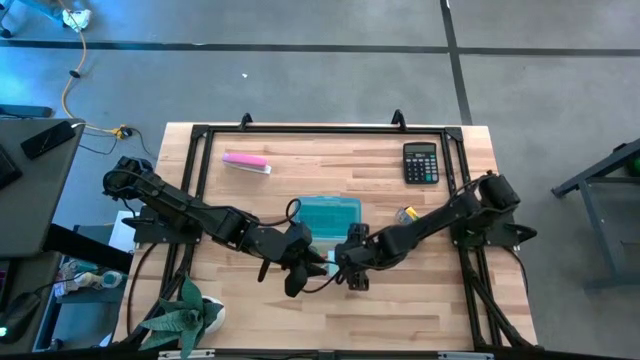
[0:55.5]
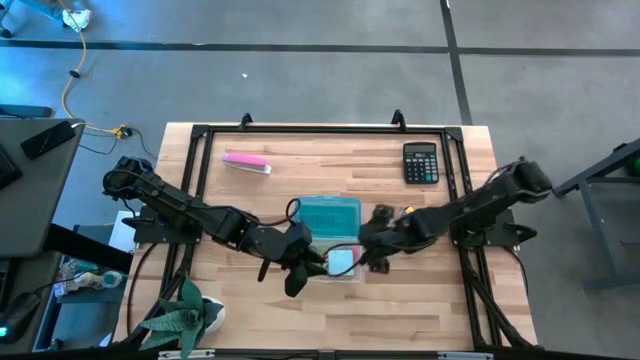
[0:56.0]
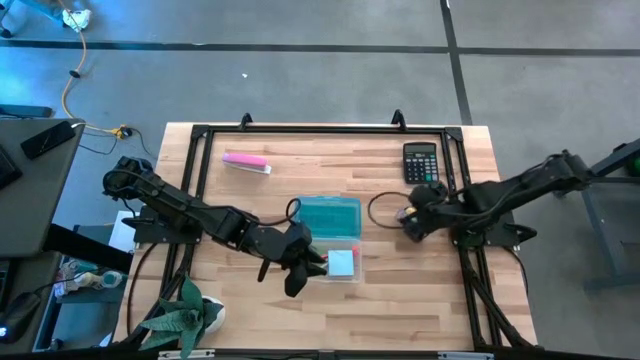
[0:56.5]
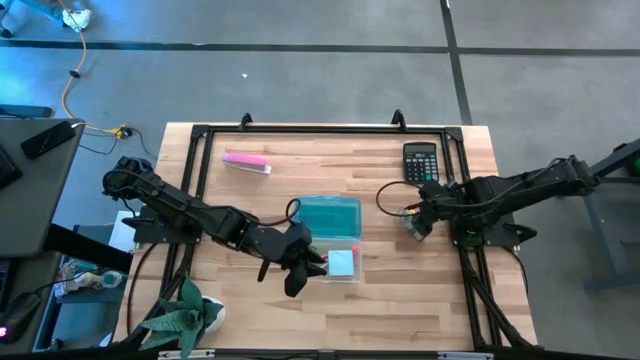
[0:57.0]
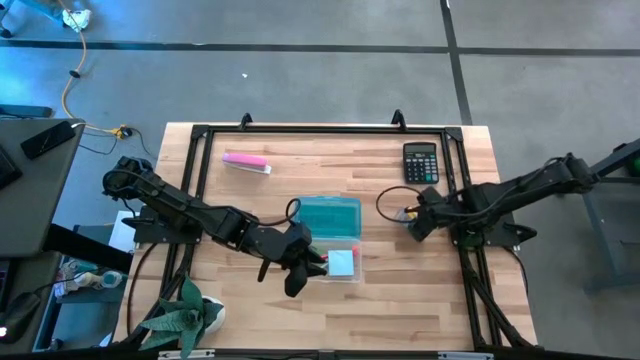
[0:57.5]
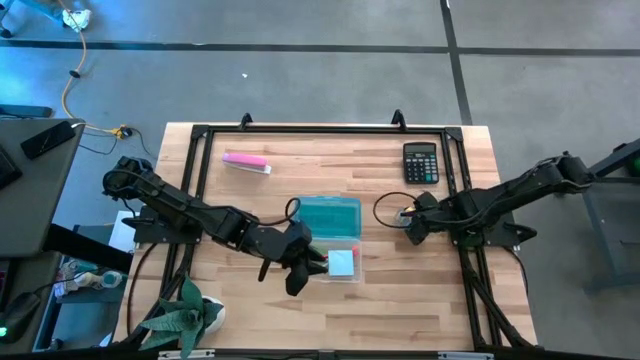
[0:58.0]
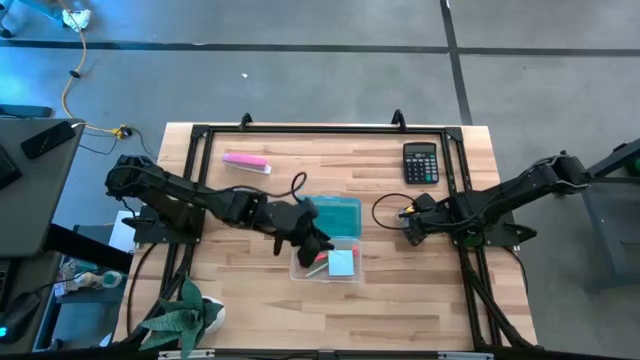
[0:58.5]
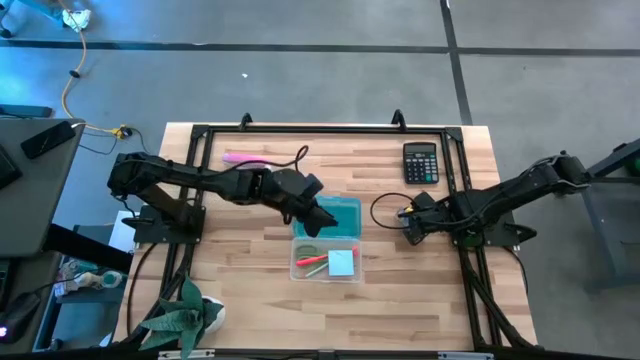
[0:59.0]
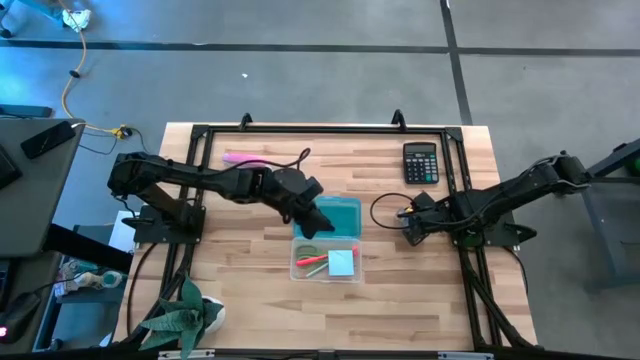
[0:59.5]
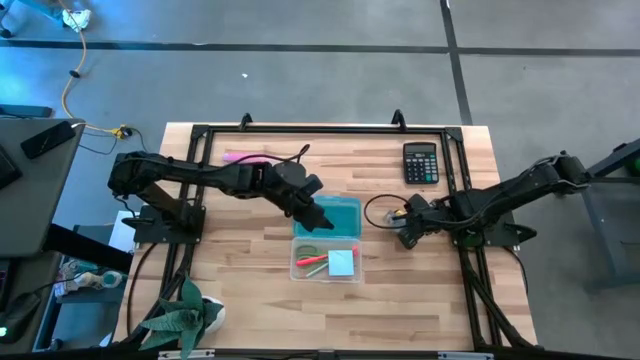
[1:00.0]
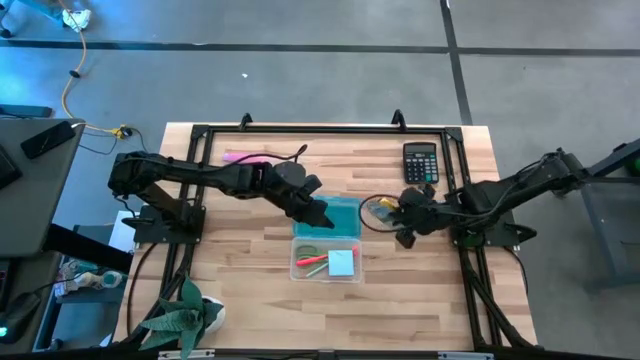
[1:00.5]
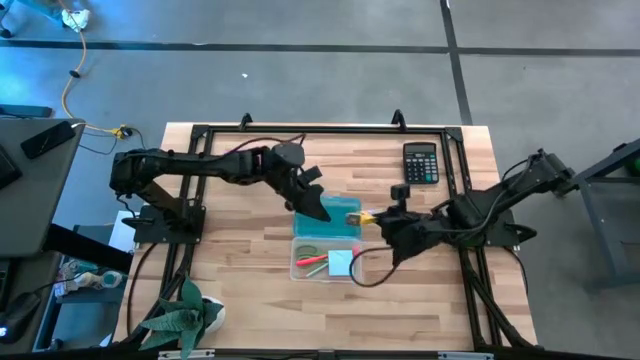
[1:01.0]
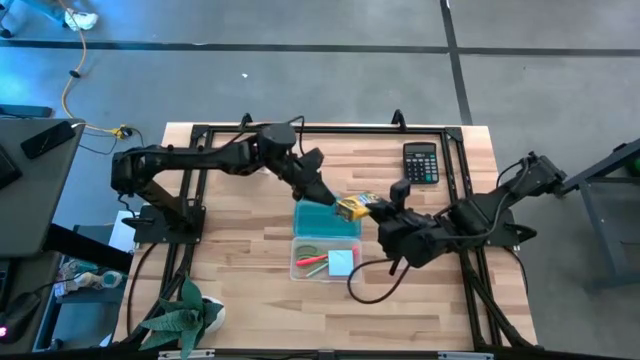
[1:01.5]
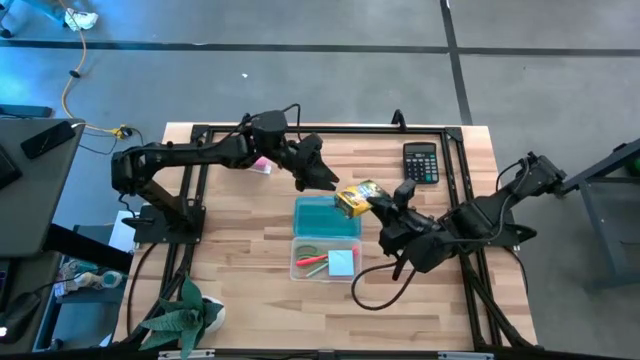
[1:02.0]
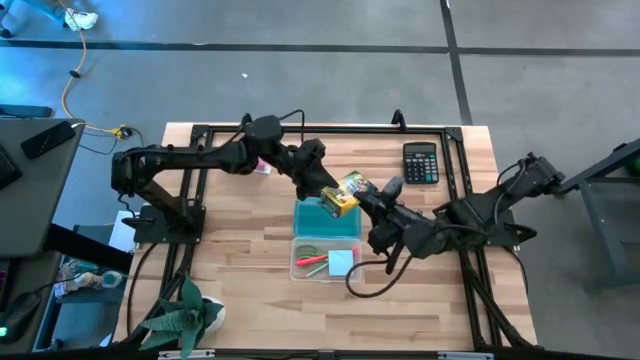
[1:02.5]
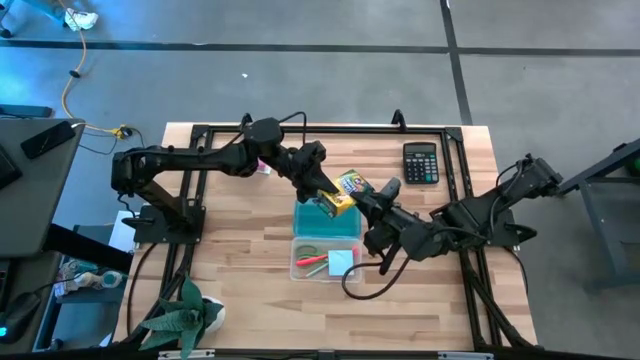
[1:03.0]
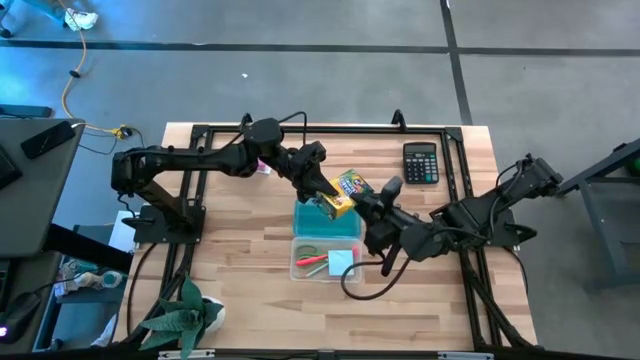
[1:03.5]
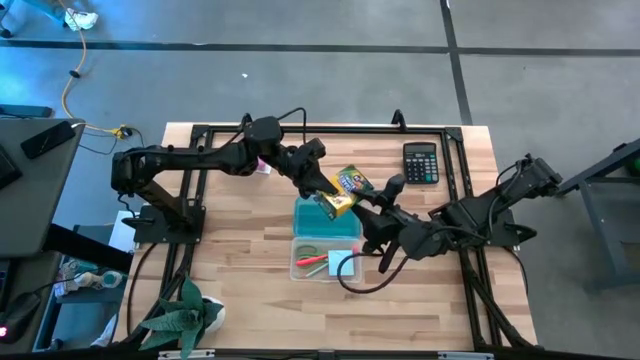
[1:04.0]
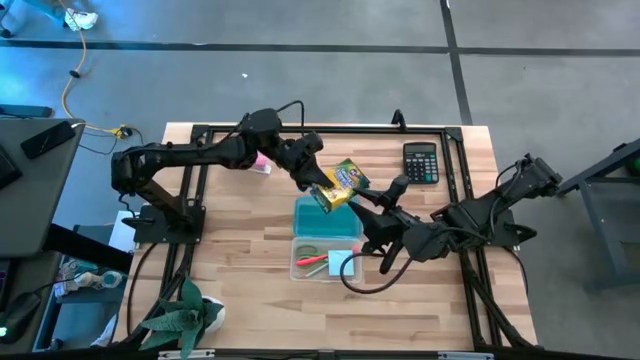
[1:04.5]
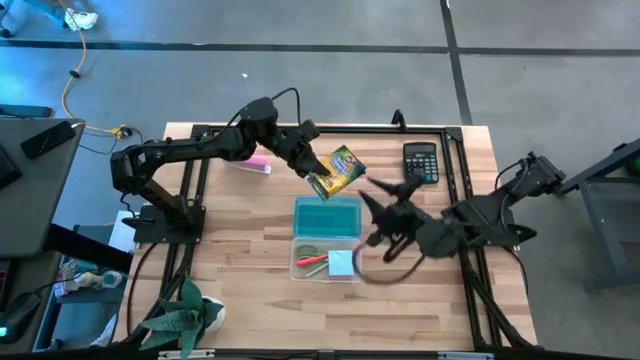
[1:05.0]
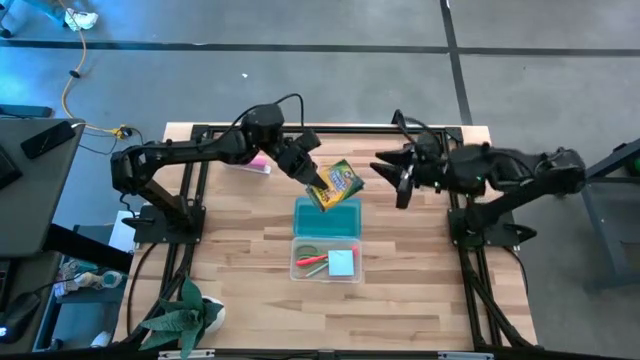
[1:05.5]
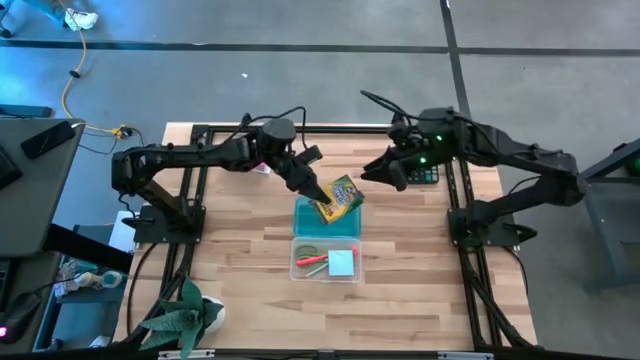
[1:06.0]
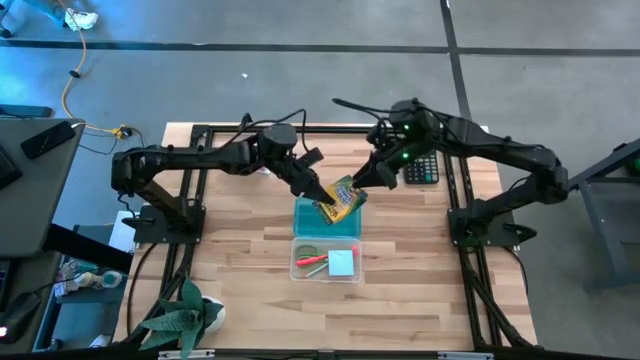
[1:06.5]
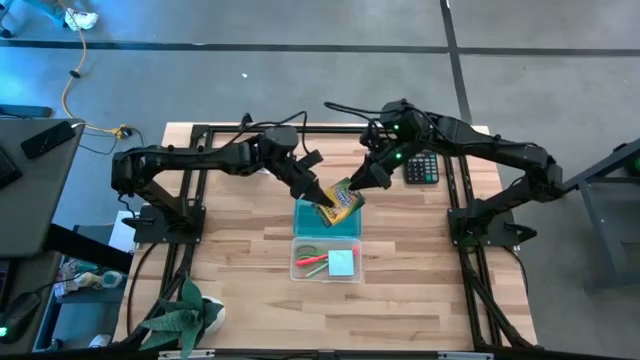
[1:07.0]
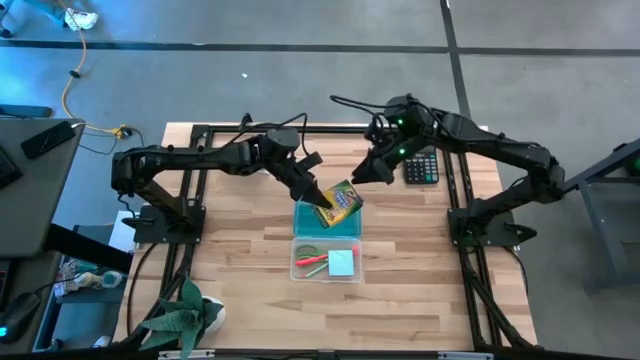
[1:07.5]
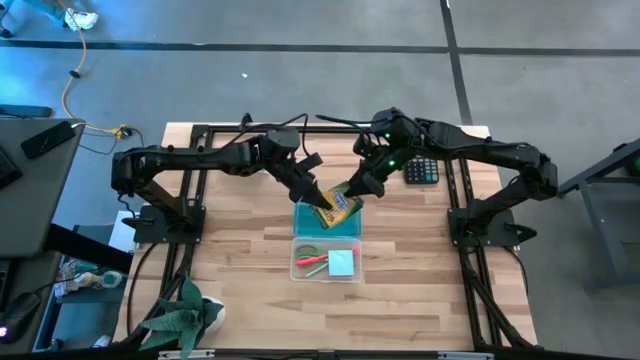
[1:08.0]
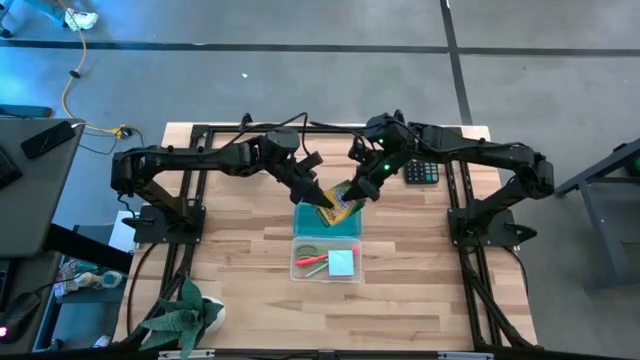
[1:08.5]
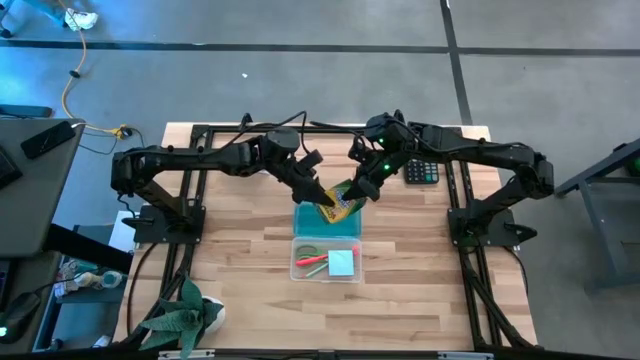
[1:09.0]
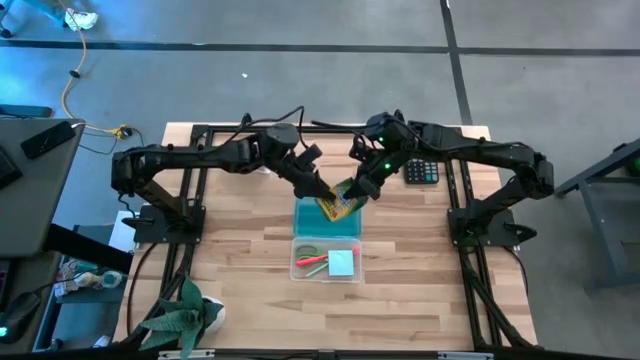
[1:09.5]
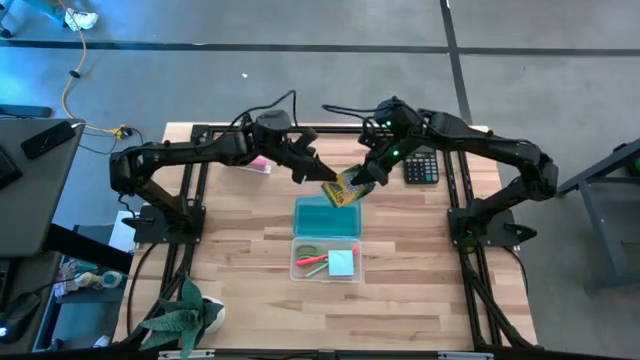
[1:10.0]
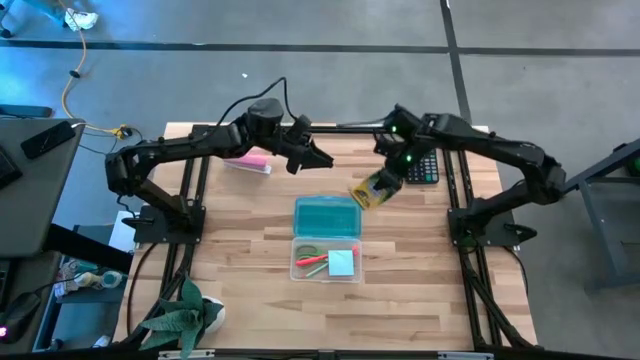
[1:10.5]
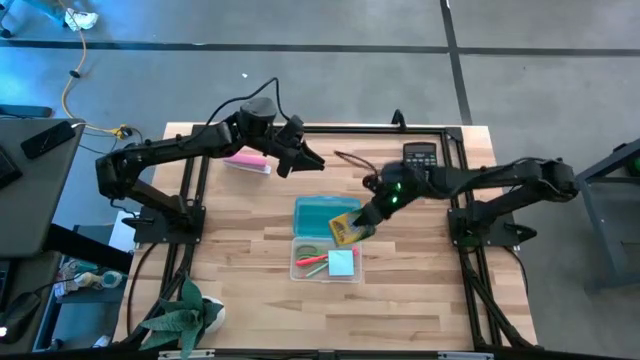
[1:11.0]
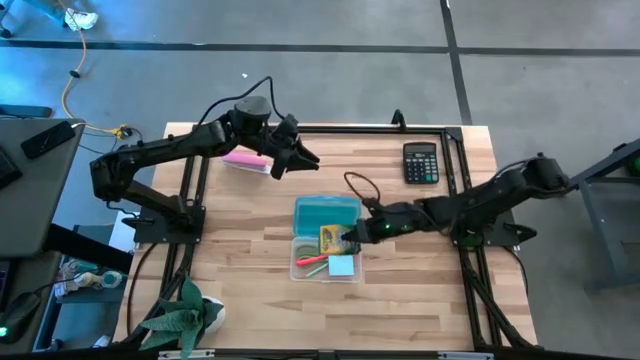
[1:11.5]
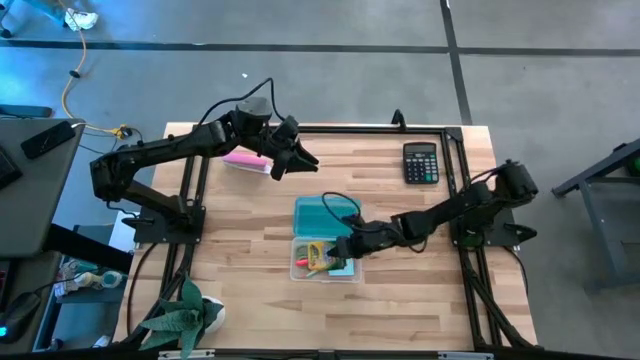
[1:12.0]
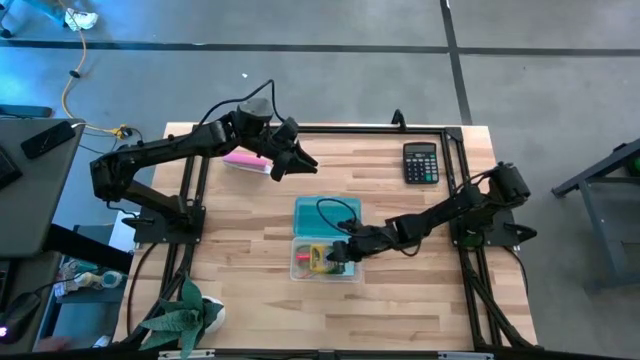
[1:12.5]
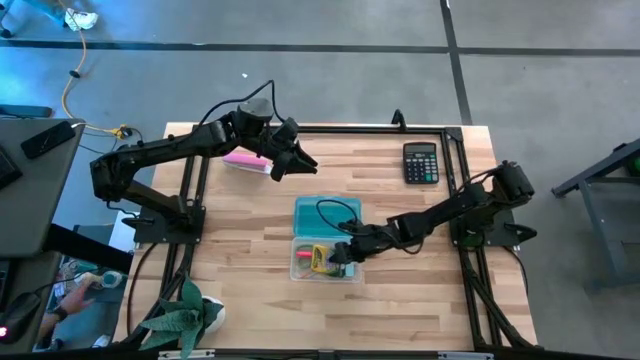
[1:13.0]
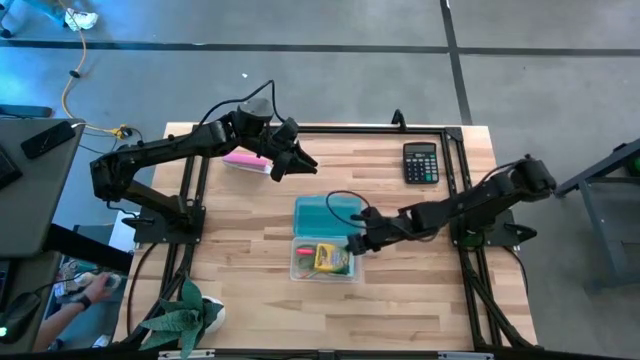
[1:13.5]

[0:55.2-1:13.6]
Task: Pack school essentials
Put the yellow crayon box into the supply box

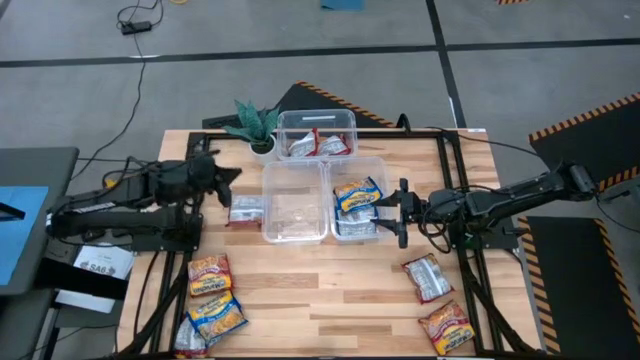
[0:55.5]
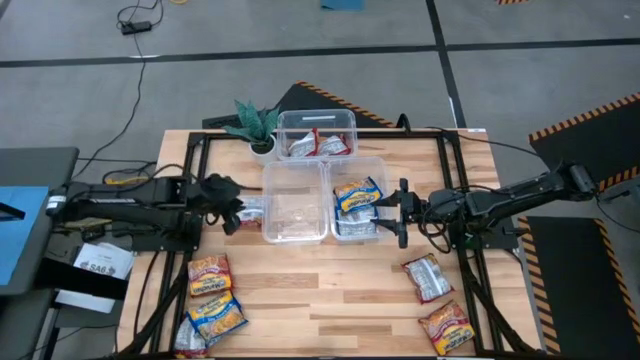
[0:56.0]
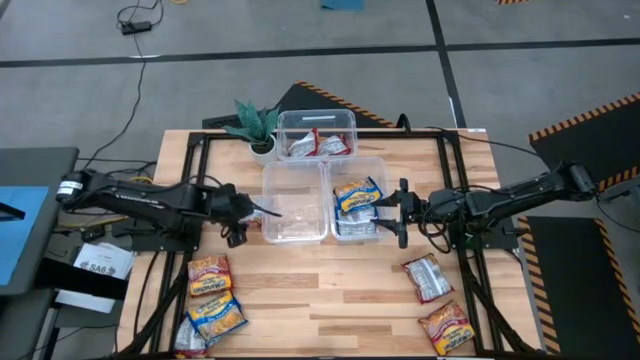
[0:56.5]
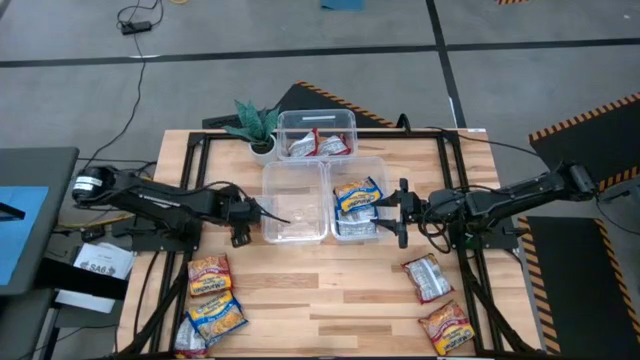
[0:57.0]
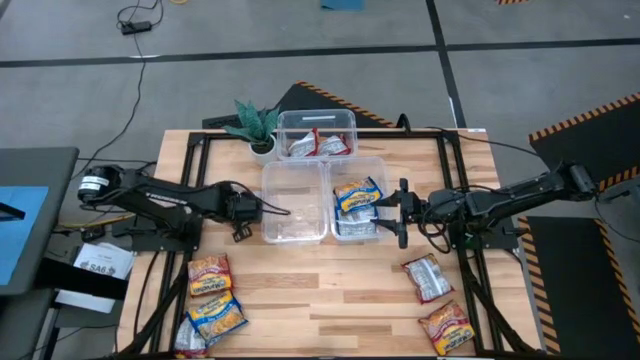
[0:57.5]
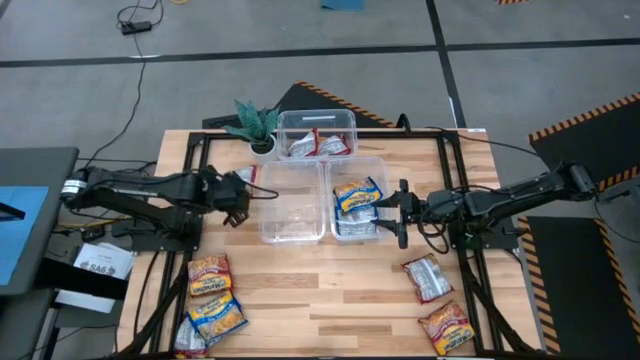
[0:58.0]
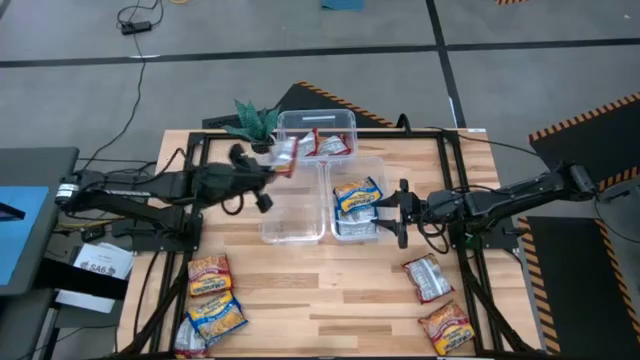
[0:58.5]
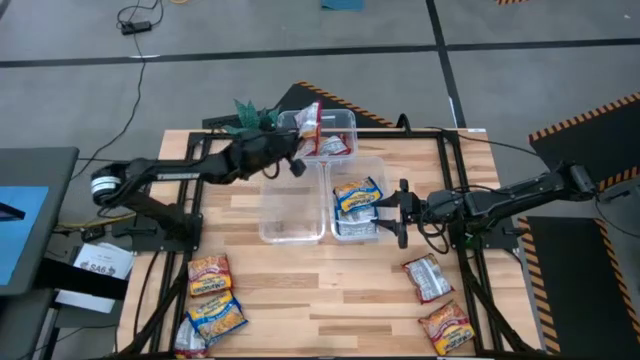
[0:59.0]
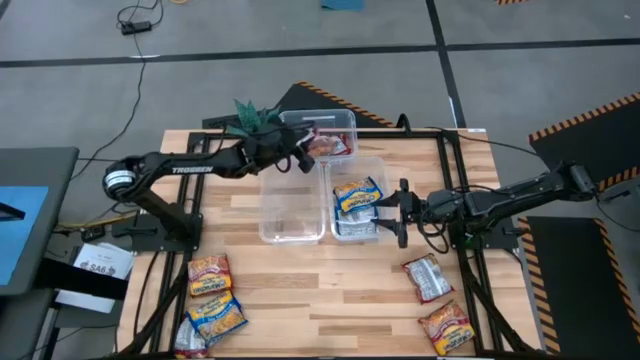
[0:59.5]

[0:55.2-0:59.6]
Task: Sort Maruchan noodles
Put the red noodle pack into the top transparent bin
